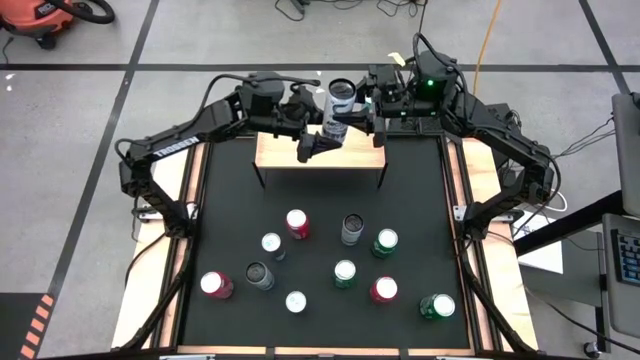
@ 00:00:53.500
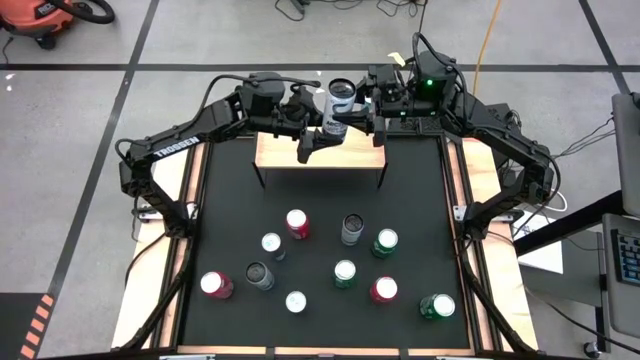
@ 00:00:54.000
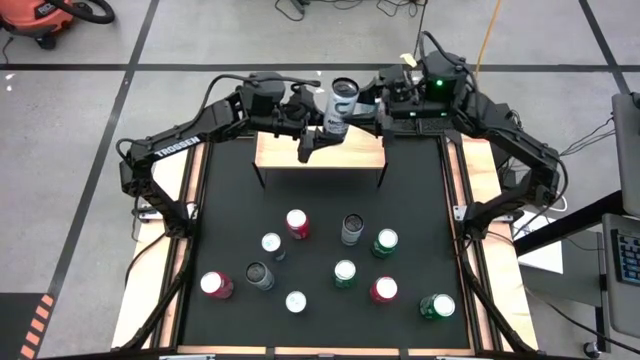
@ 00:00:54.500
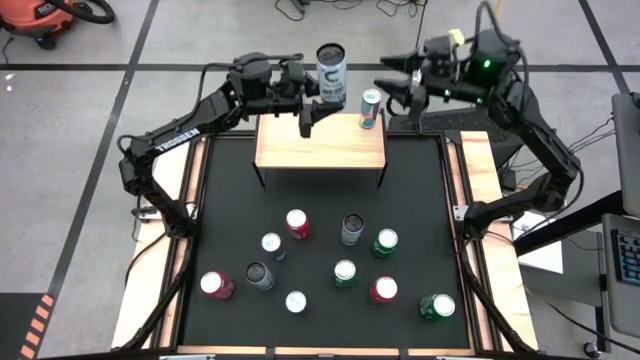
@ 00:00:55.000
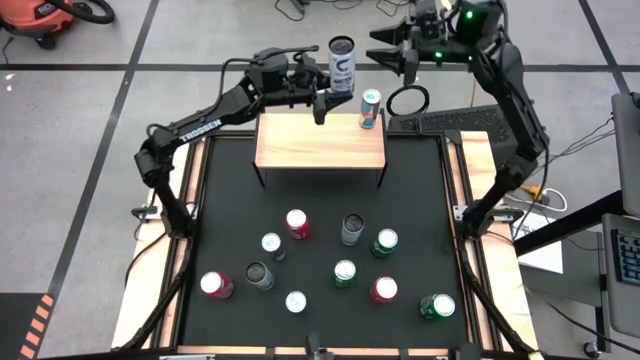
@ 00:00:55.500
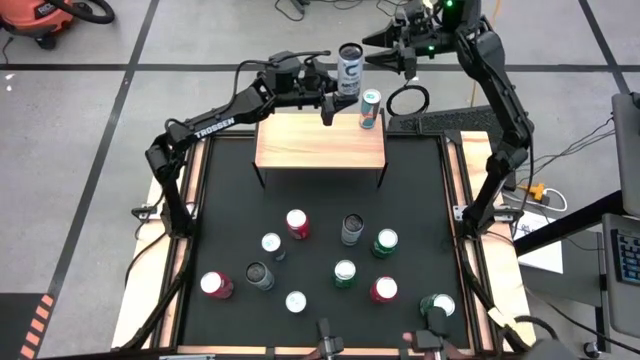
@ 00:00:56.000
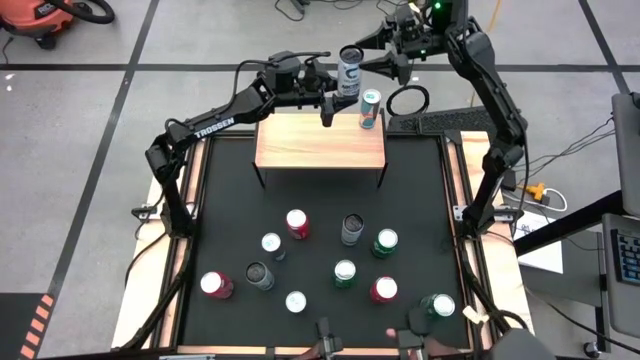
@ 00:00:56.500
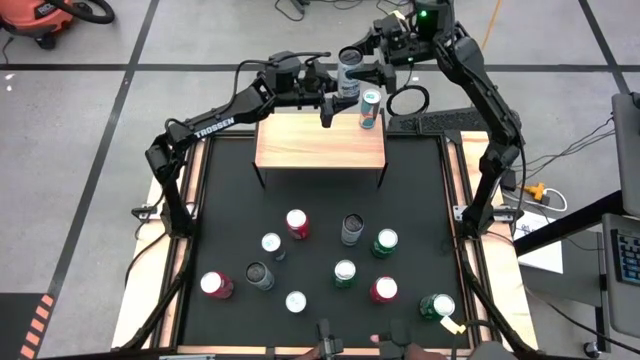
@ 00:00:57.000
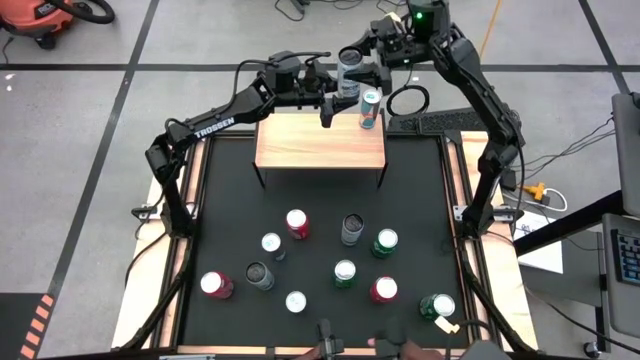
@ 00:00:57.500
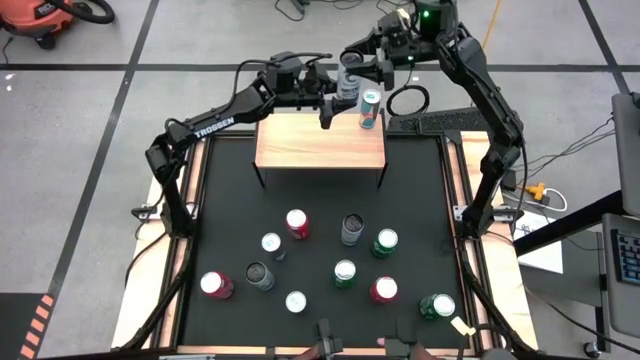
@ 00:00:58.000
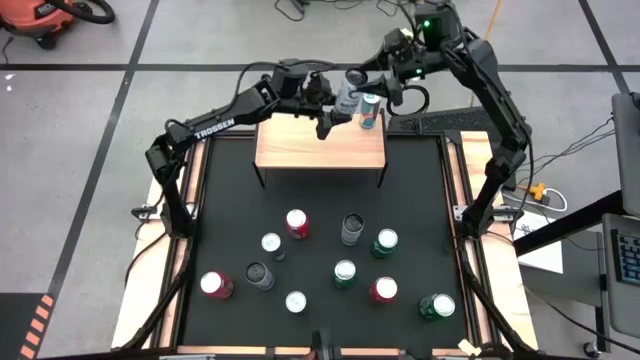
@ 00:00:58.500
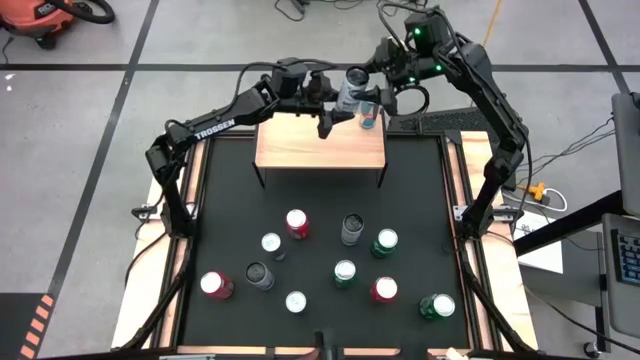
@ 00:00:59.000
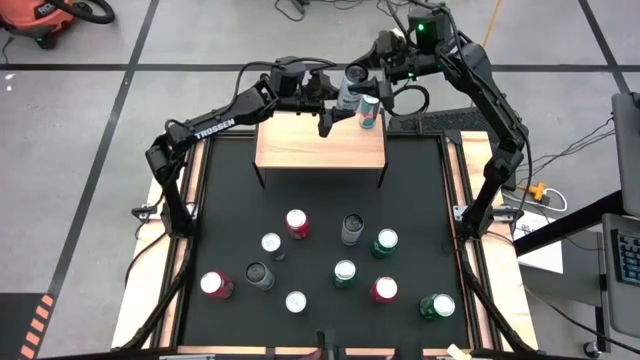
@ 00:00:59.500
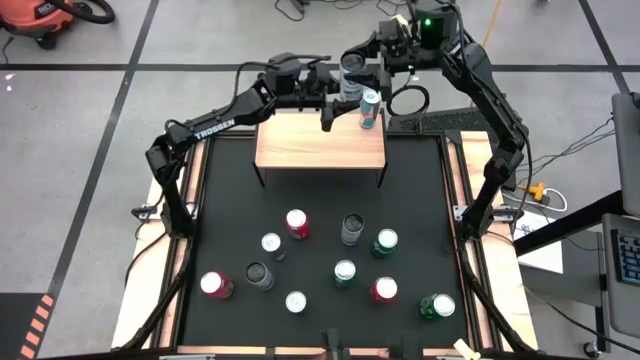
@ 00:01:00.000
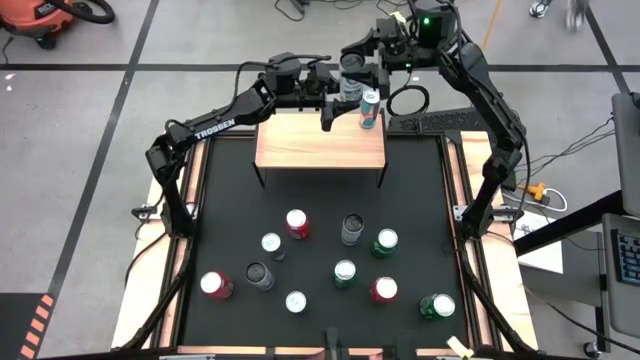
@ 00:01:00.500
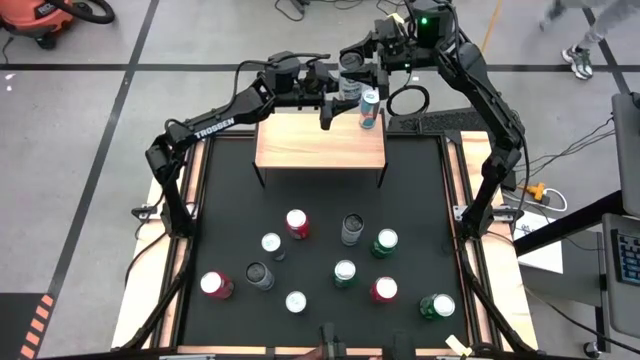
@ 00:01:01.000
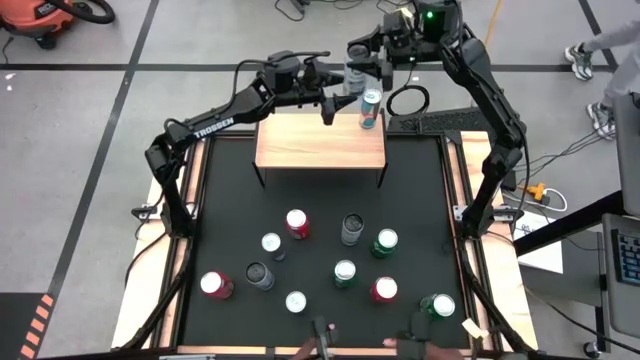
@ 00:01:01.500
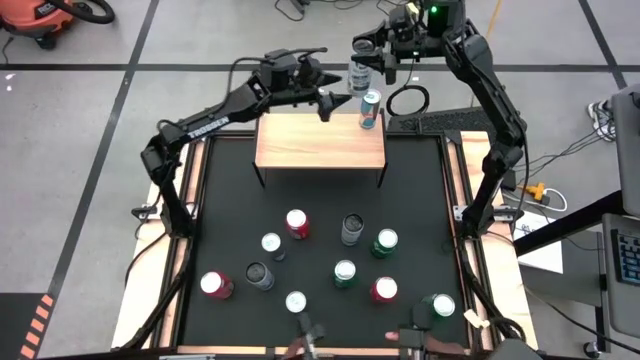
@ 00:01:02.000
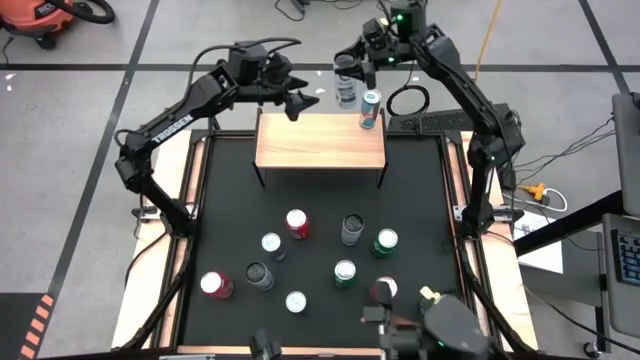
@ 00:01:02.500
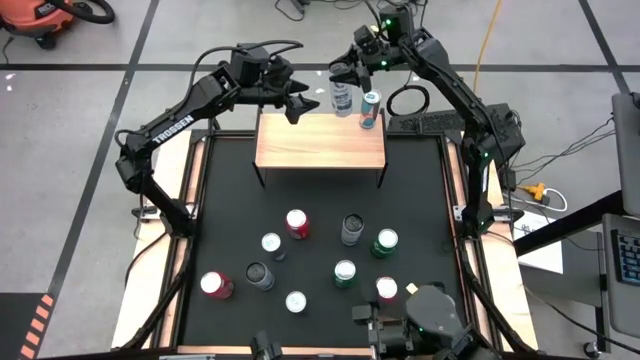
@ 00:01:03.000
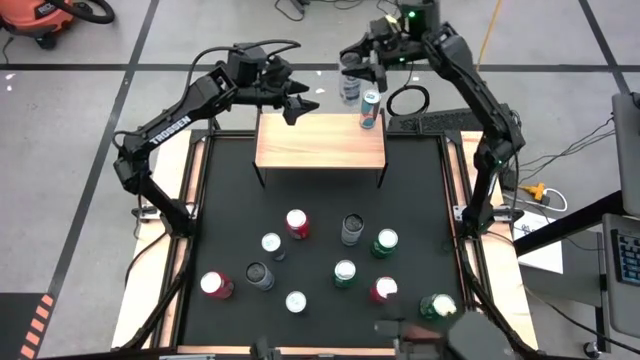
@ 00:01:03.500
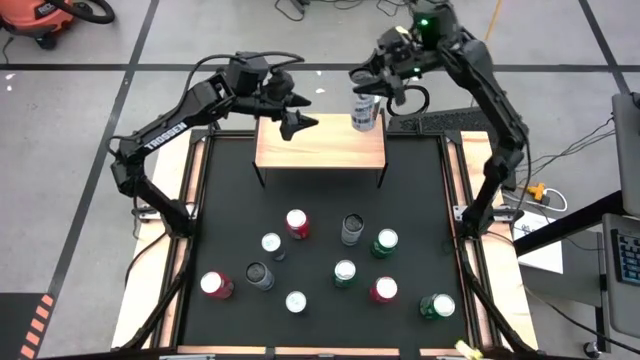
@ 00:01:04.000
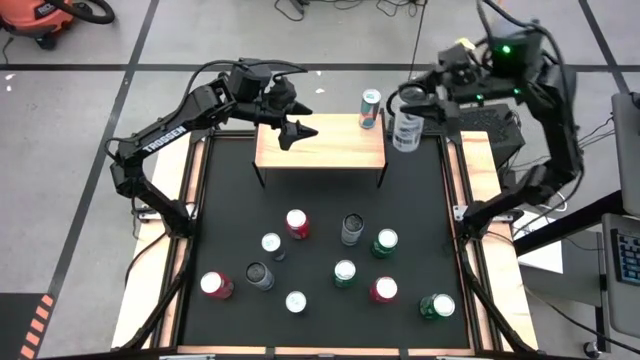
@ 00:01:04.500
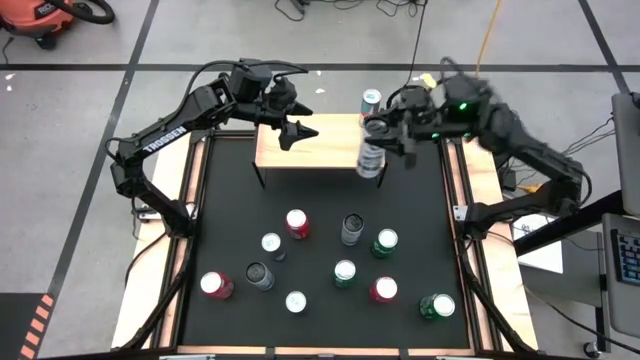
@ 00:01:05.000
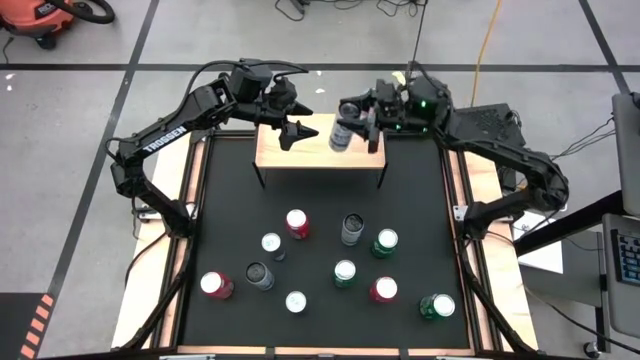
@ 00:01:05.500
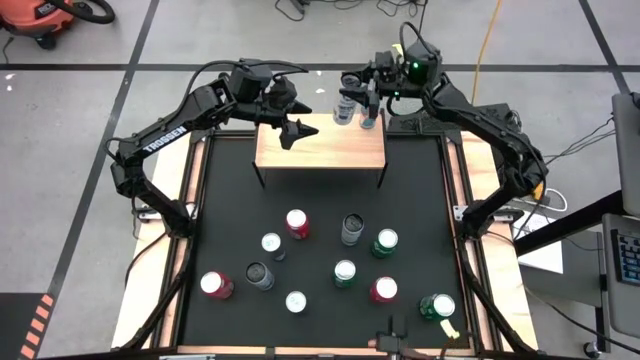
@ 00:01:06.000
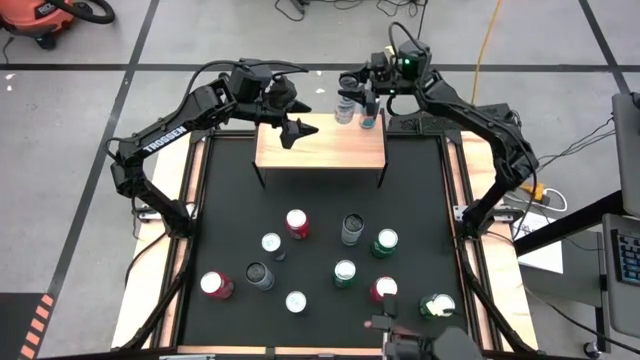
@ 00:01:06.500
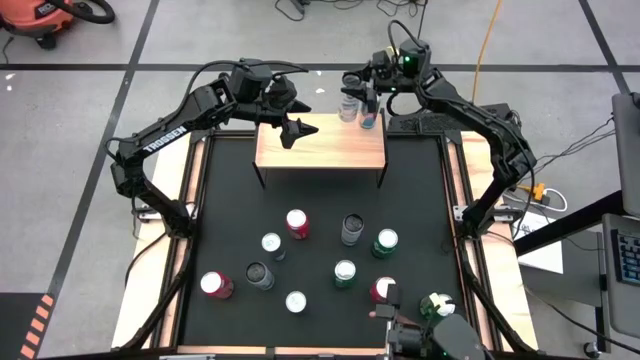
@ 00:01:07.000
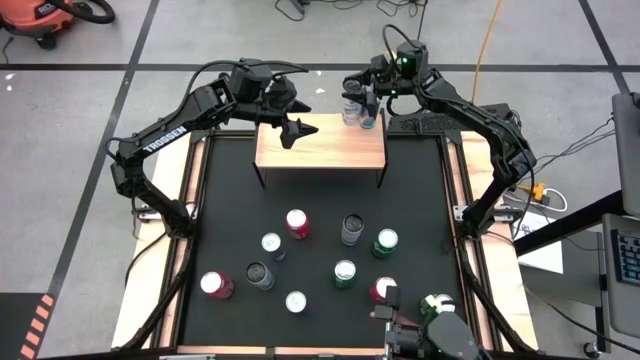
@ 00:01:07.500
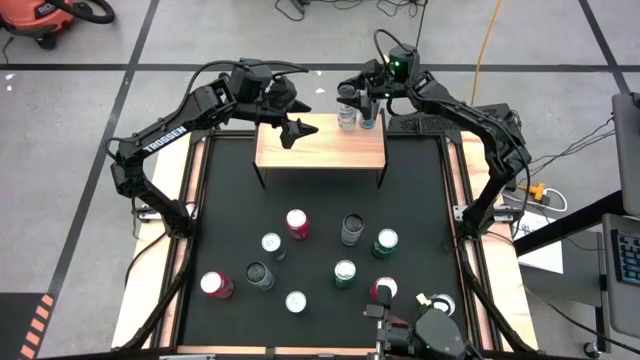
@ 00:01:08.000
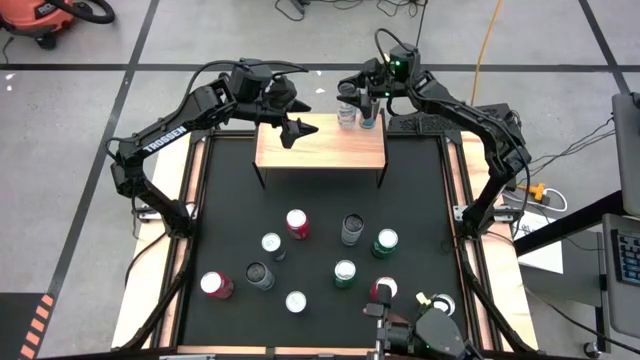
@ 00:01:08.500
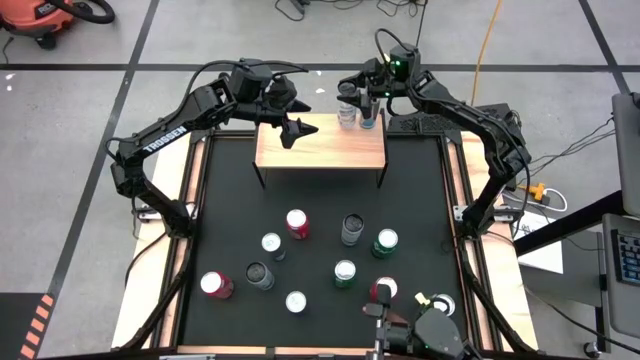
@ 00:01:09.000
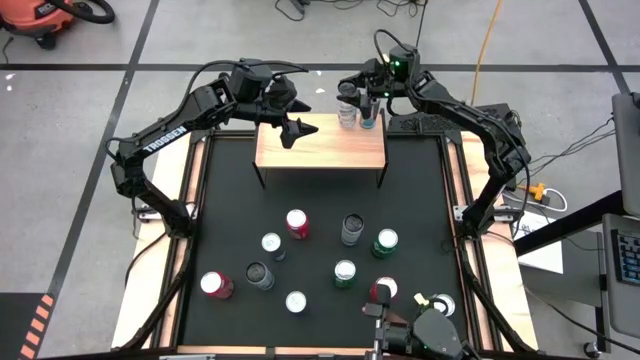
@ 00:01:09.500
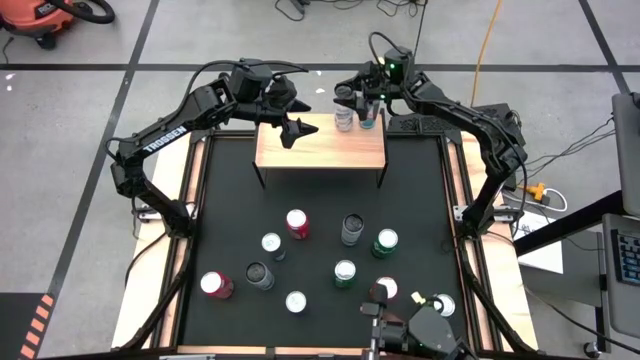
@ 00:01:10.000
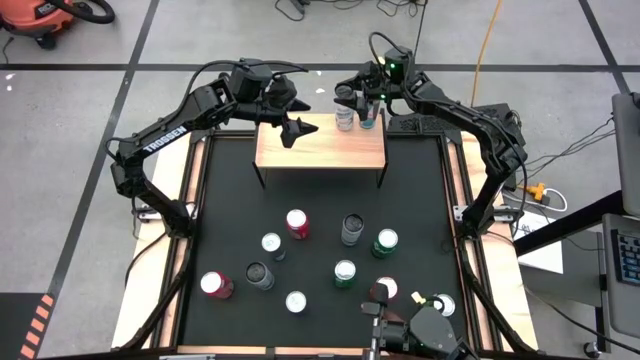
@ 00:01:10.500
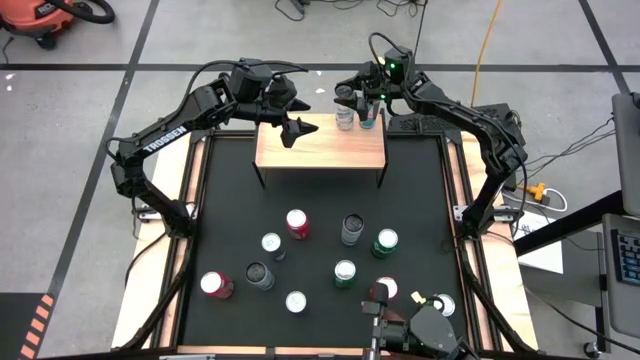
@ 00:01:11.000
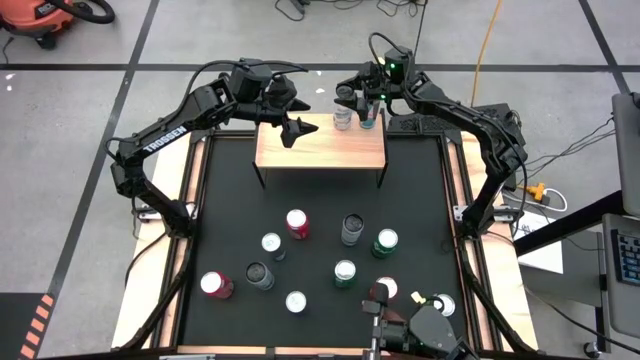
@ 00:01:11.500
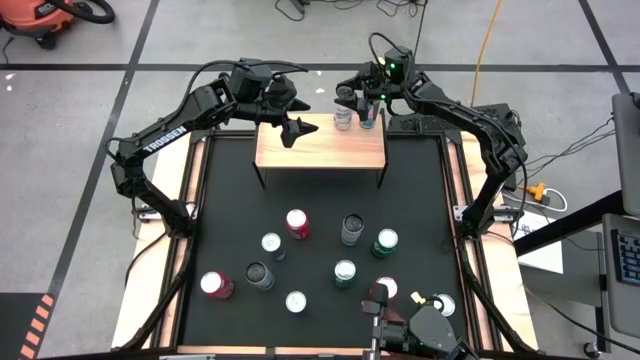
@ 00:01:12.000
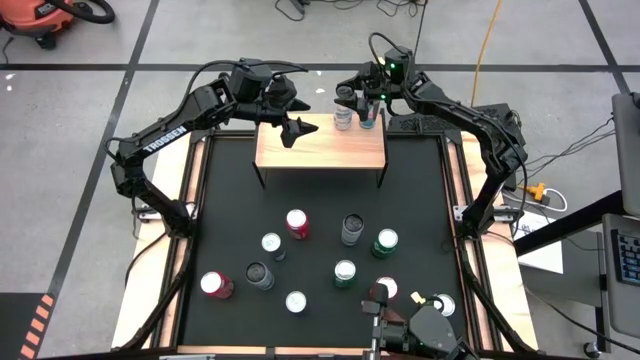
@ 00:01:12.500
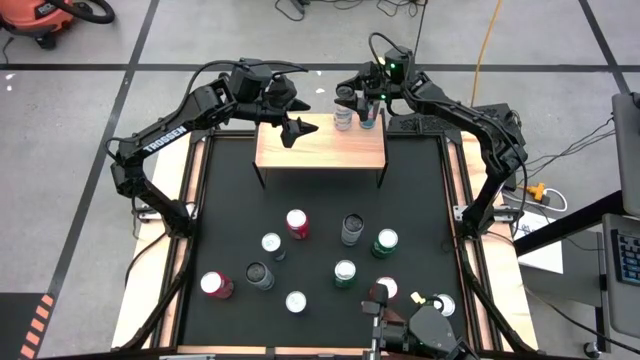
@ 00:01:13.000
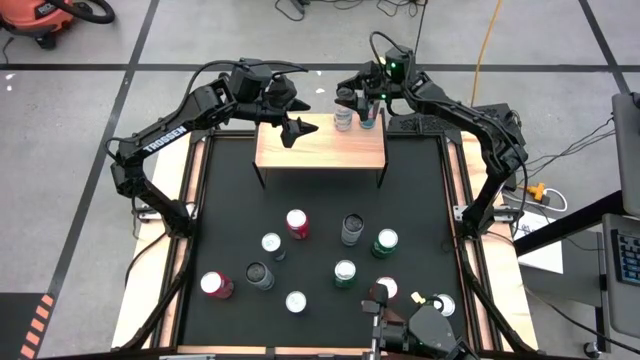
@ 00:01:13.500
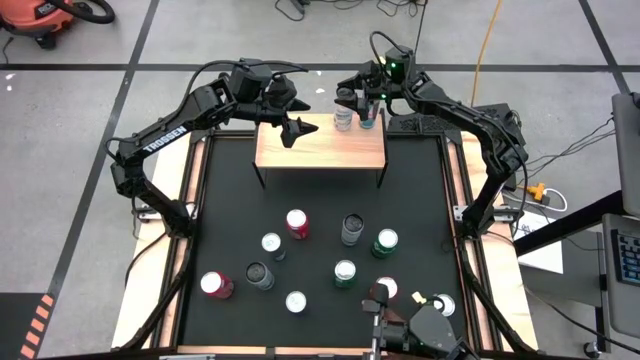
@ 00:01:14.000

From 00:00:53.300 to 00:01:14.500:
Task: Place canned beverage on shelf
Put the top left white soda can on the shelf
